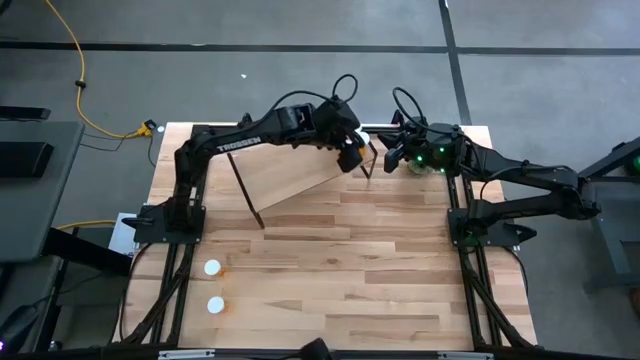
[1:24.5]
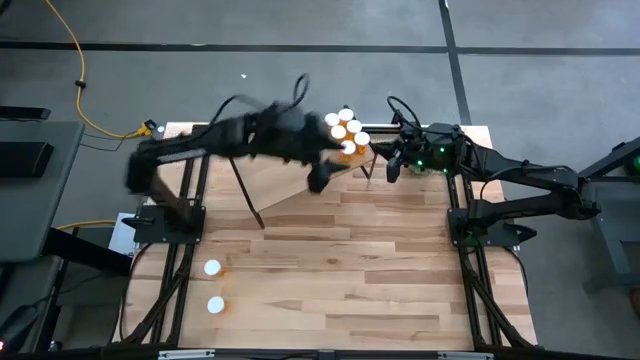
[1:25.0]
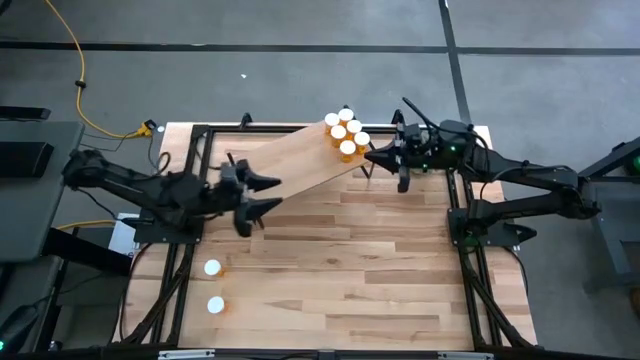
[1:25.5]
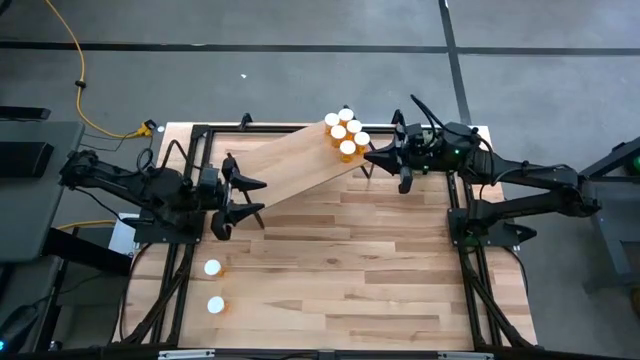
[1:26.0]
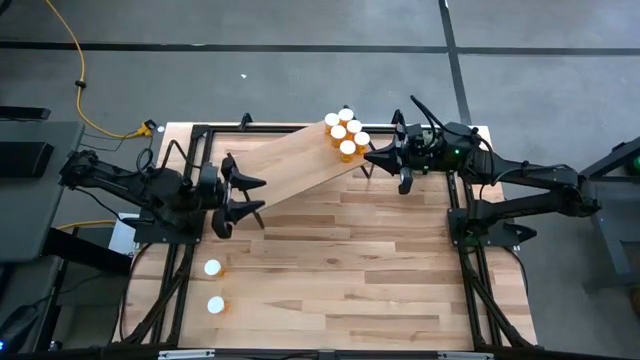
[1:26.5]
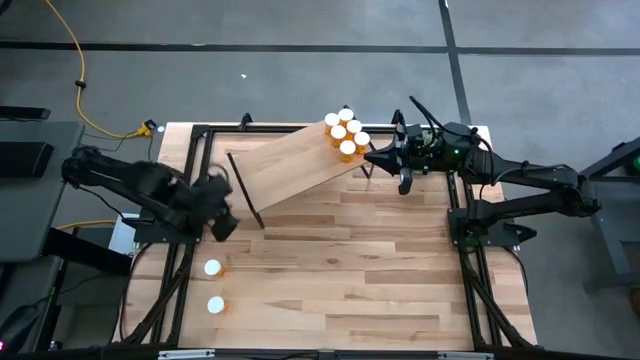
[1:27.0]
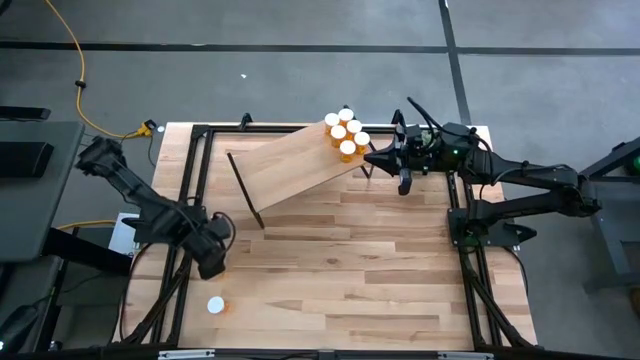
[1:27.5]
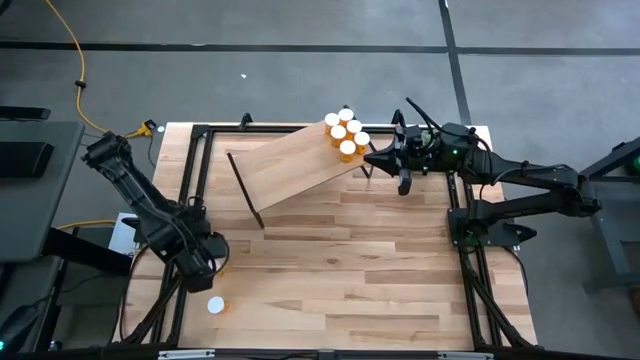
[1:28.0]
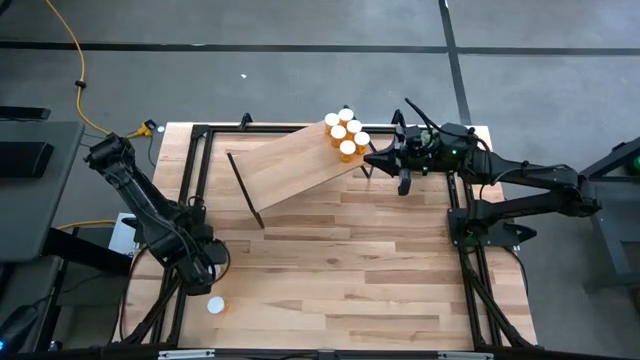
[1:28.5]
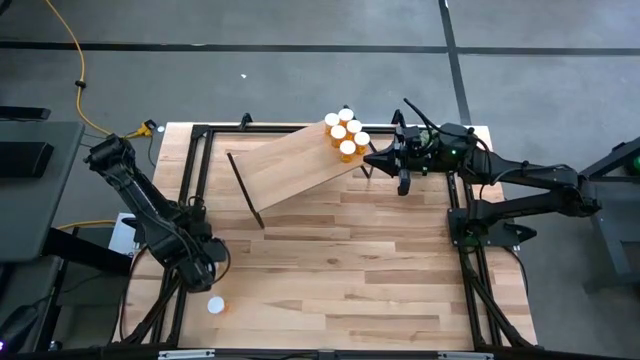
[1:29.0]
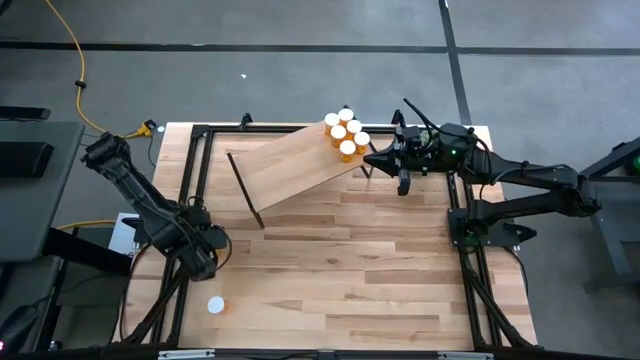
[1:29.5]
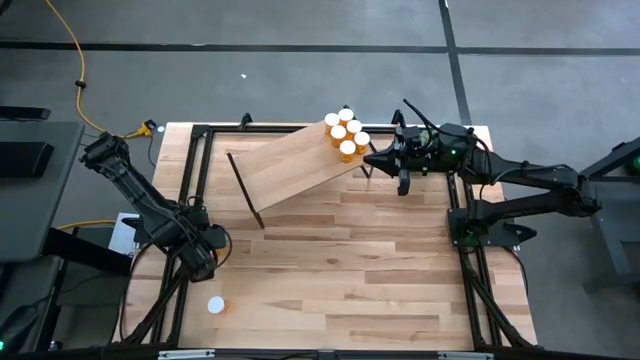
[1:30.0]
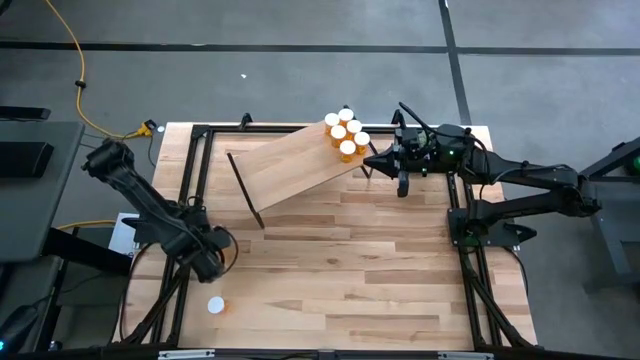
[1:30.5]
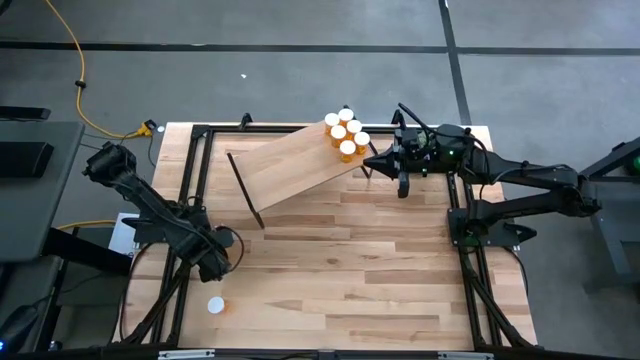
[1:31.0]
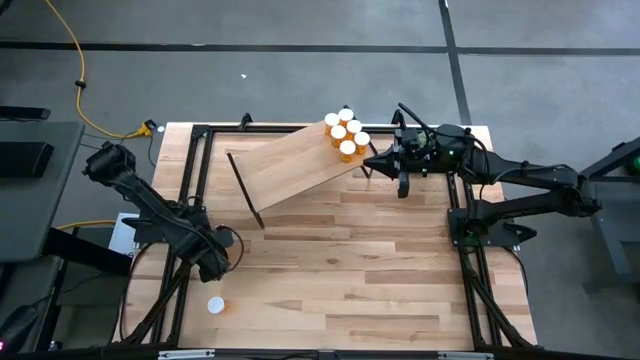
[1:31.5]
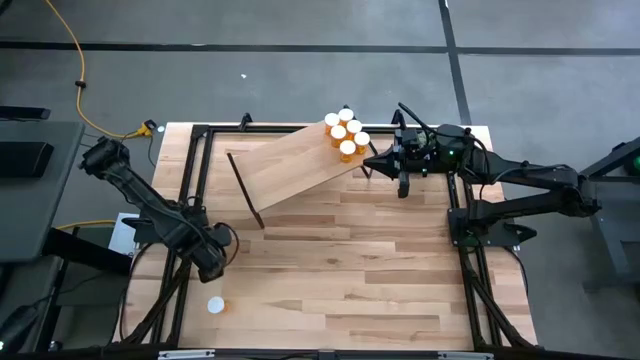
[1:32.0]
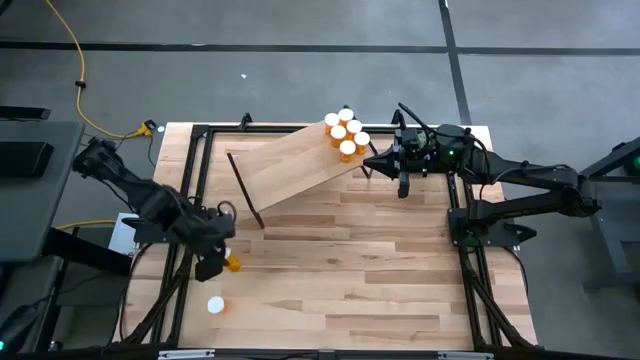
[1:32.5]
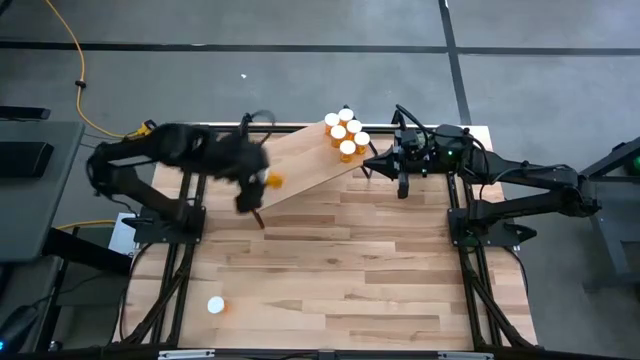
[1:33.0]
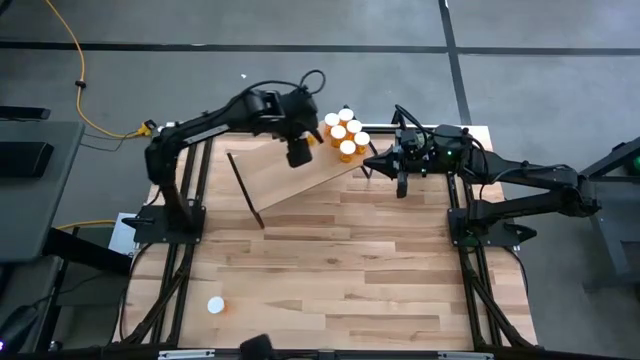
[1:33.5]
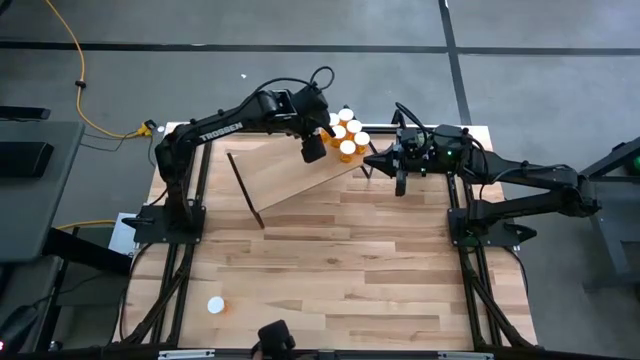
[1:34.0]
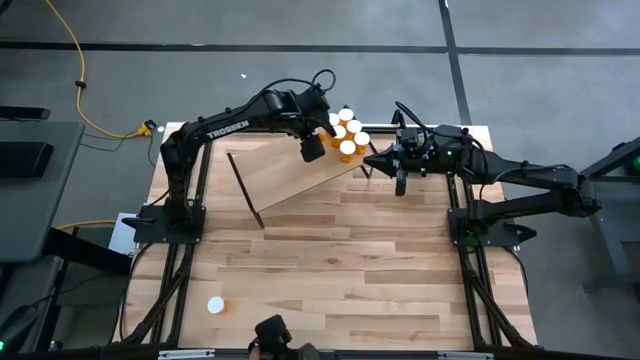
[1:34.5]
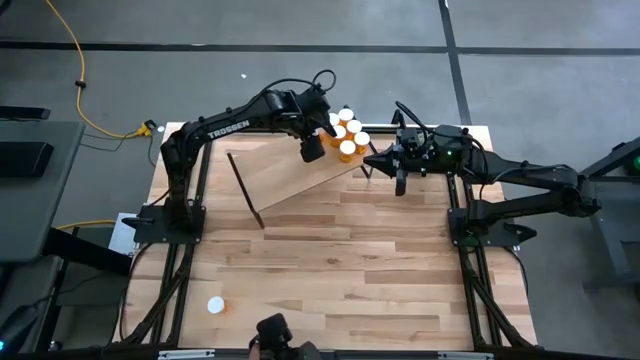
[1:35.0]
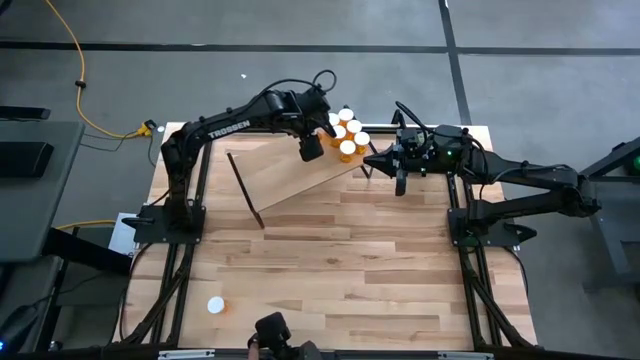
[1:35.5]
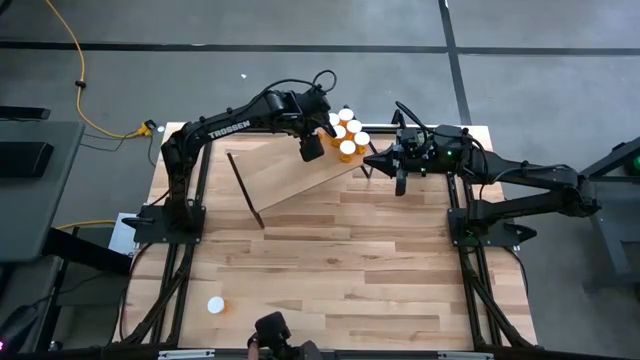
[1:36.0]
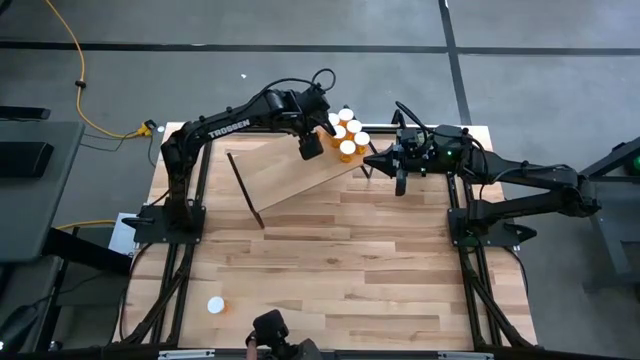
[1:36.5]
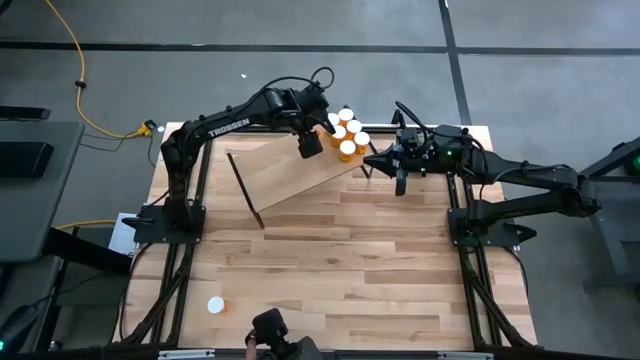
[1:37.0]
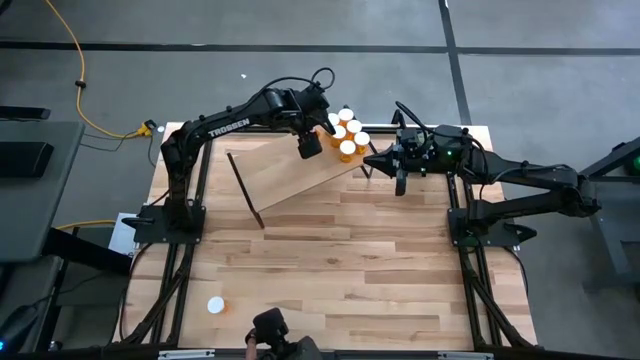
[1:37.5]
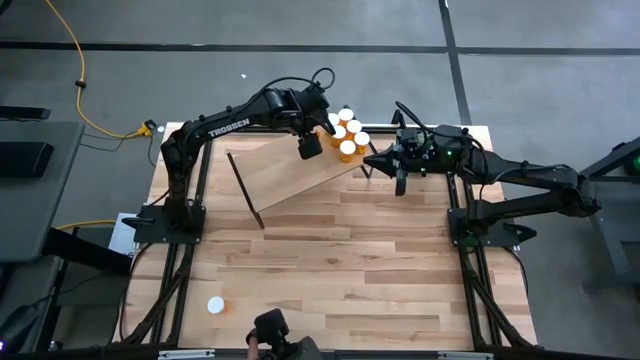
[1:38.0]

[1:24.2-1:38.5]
Task: Pick and place medicine bottles onto shelf by color
Put the pill bottle on the shelf aligned with the other pill bottles

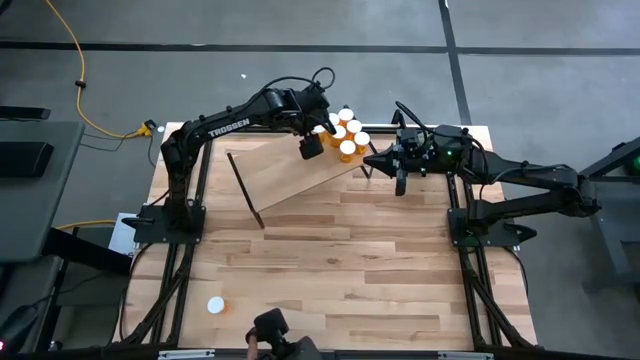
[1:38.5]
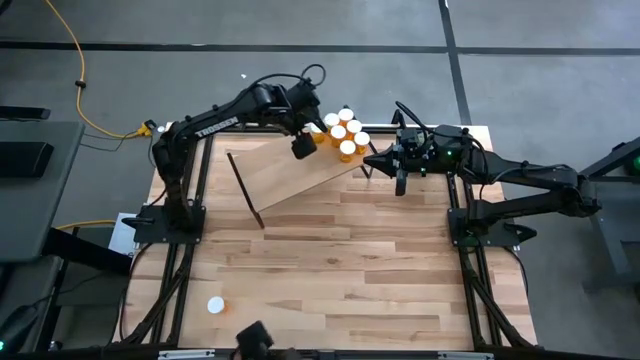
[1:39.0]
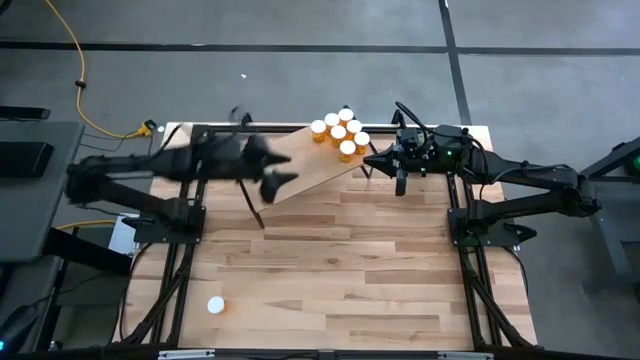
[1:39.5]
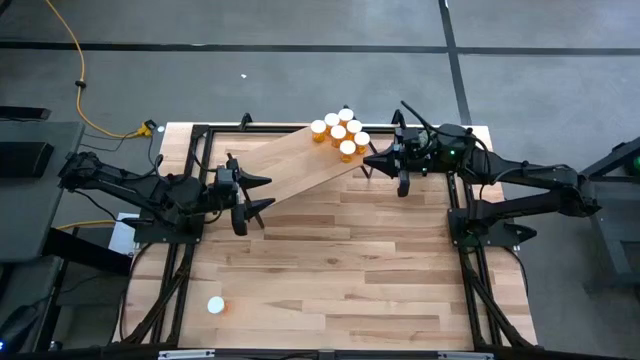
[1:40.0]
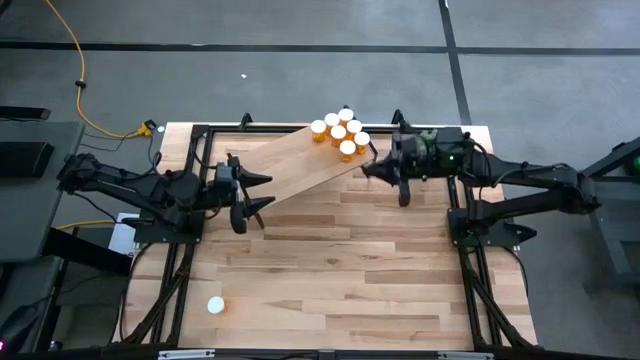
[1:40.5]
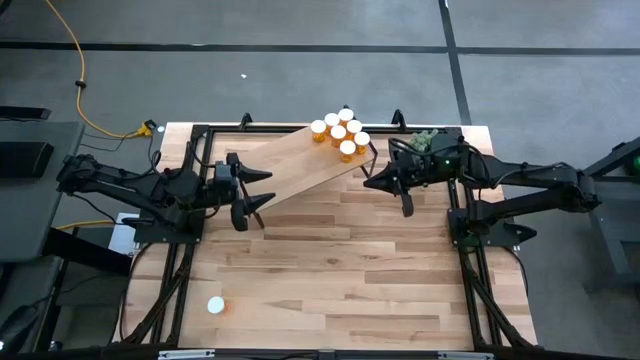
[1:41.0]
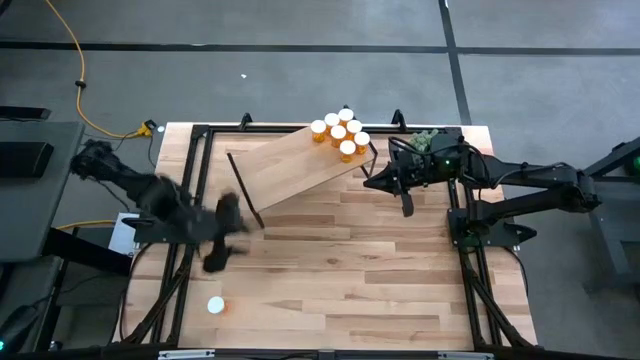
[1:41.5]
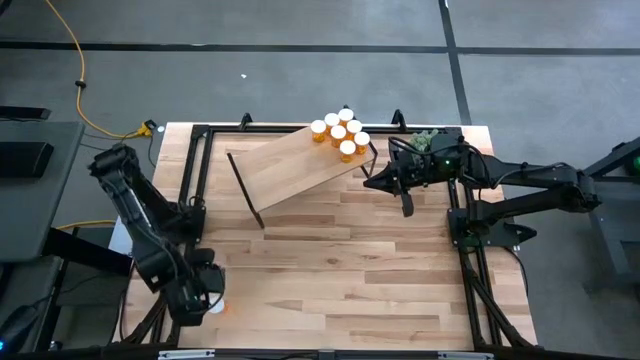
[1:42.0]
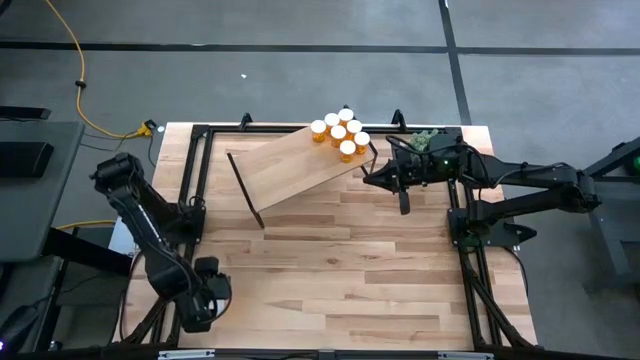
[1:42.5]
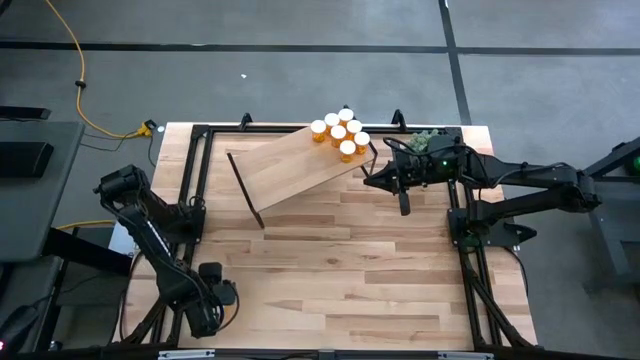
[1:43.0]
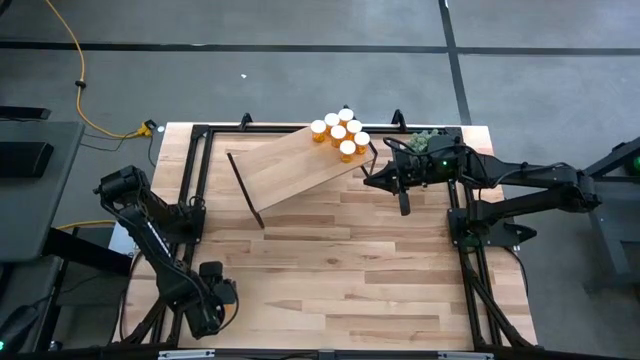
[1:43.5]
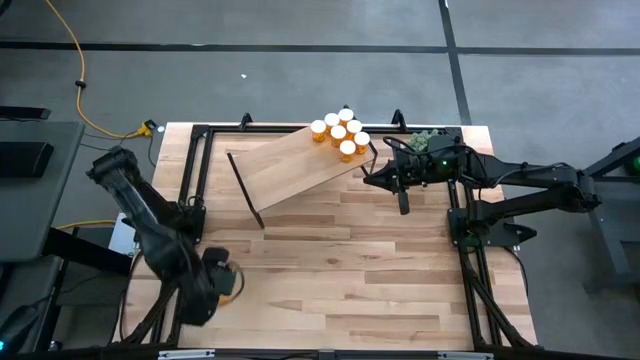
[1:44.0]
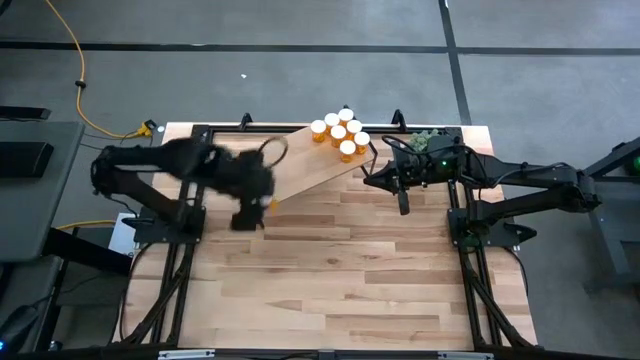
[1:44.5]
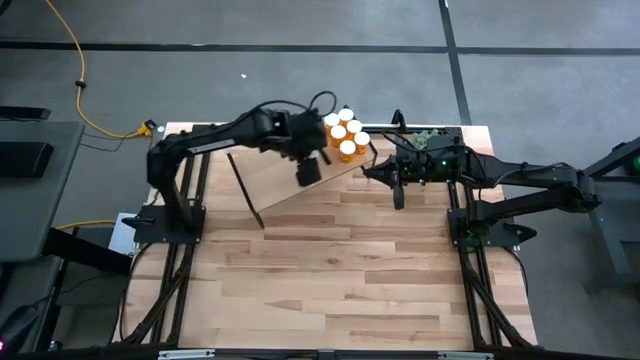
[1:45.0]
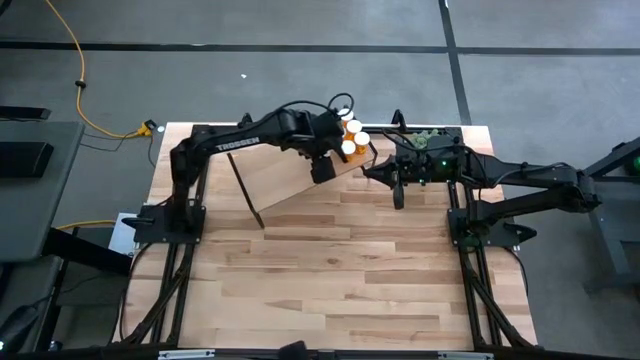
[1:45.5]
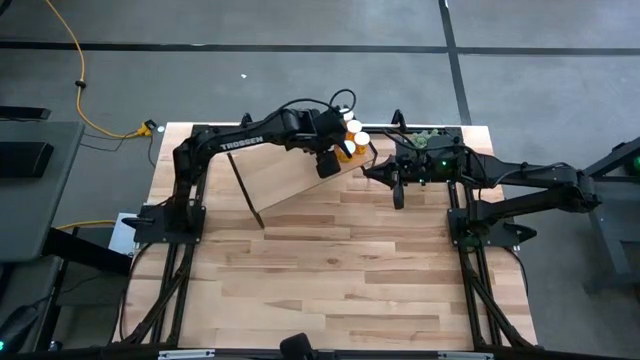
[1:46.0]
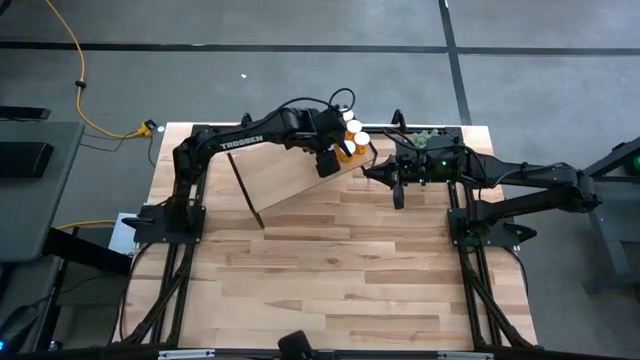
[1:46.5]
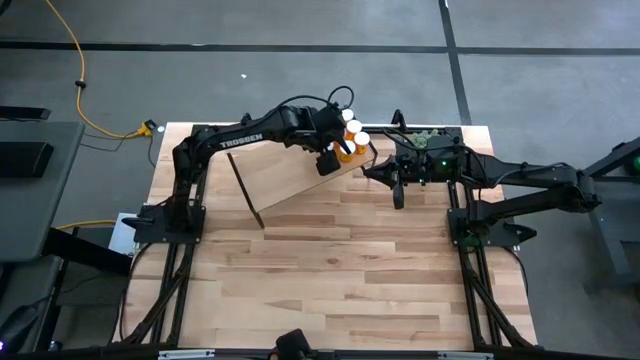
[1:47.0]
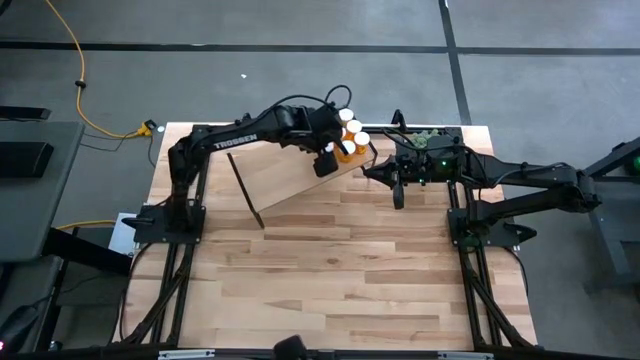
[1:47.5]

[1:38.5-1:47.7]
Put the pill bottle on the shelf aligned with the other pill bottles
